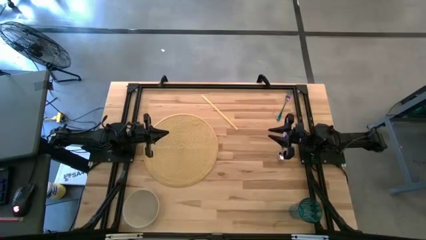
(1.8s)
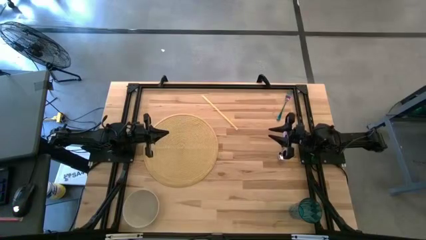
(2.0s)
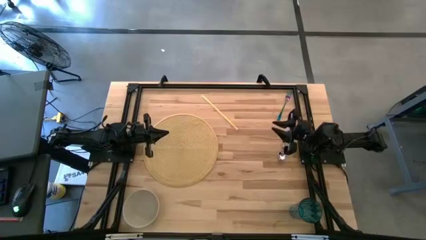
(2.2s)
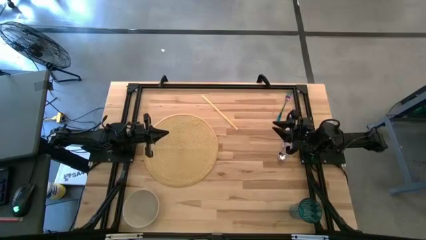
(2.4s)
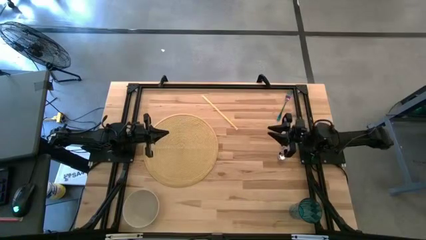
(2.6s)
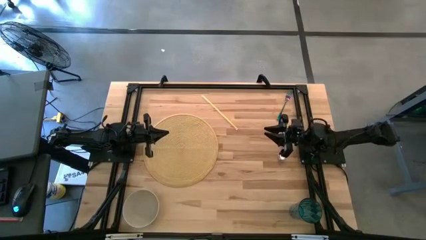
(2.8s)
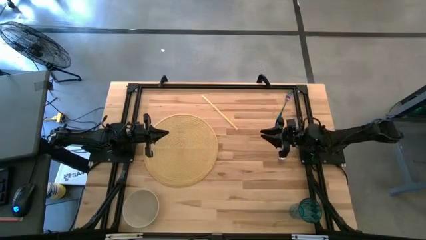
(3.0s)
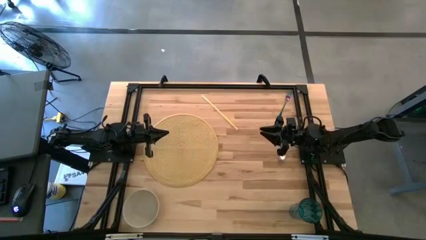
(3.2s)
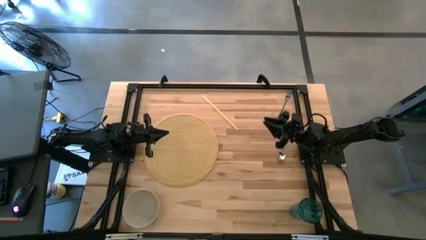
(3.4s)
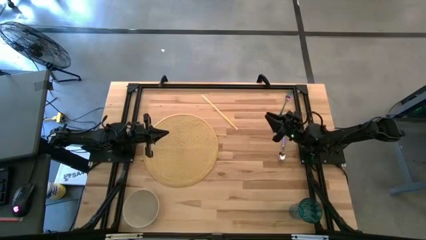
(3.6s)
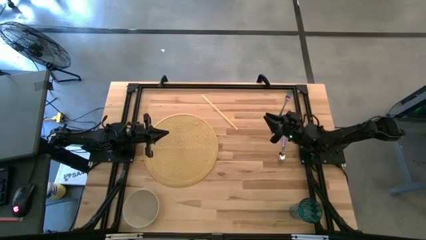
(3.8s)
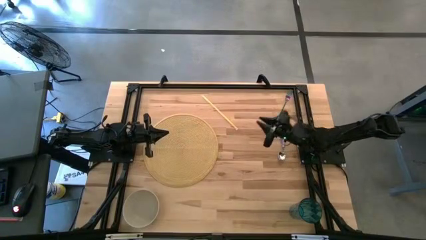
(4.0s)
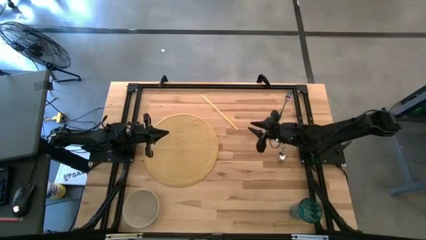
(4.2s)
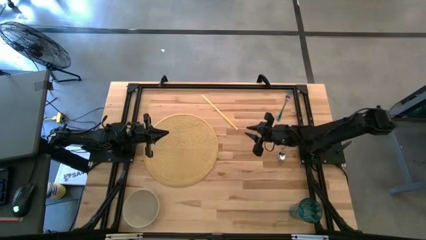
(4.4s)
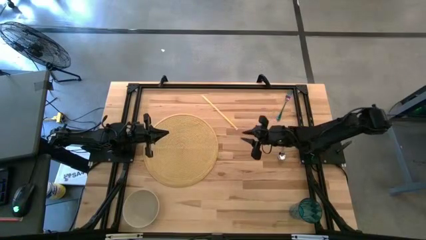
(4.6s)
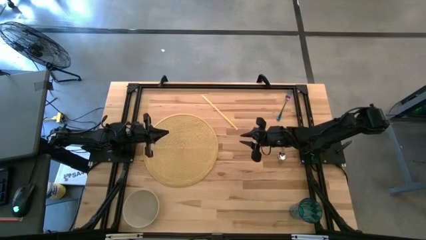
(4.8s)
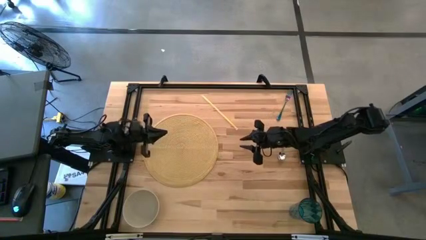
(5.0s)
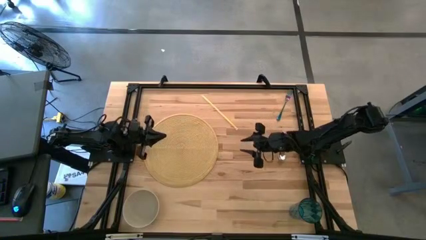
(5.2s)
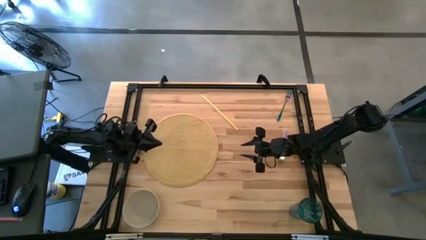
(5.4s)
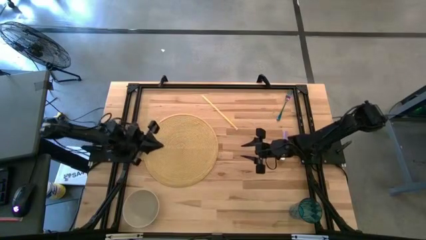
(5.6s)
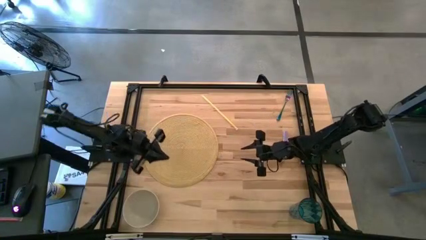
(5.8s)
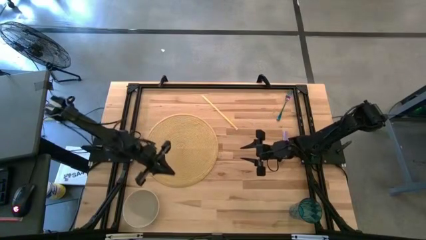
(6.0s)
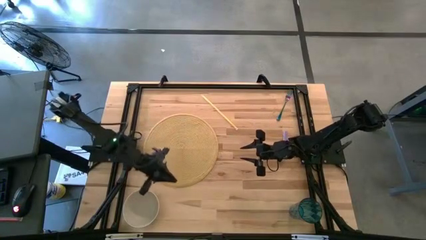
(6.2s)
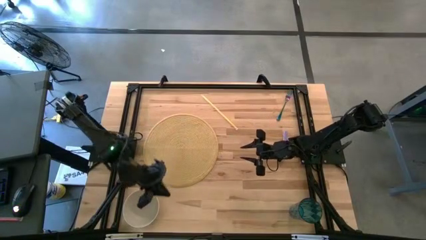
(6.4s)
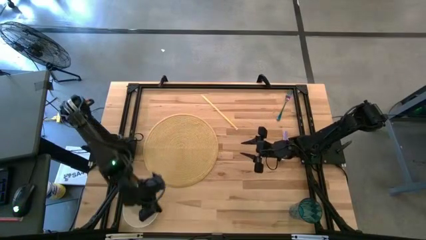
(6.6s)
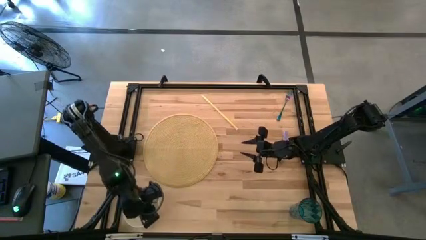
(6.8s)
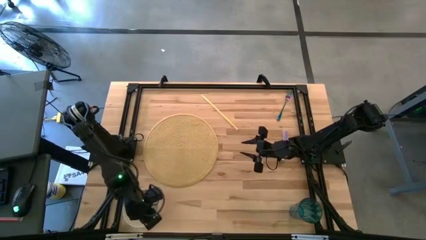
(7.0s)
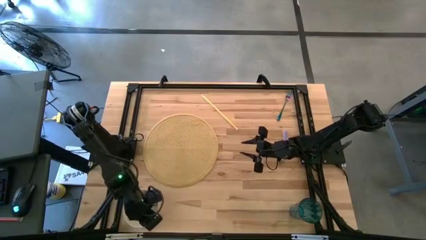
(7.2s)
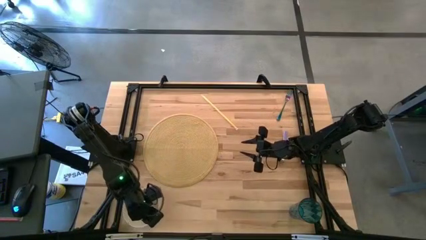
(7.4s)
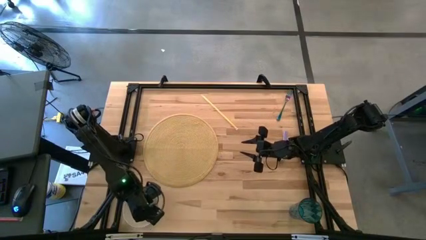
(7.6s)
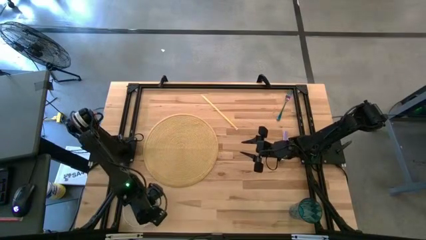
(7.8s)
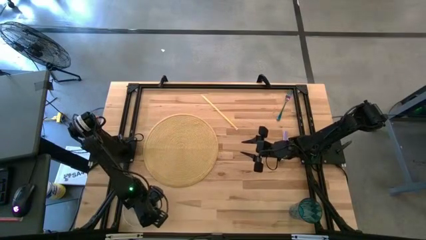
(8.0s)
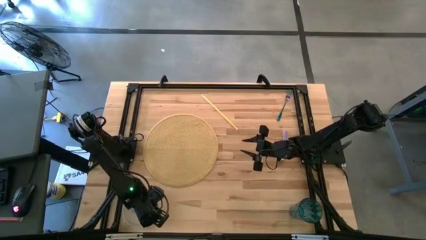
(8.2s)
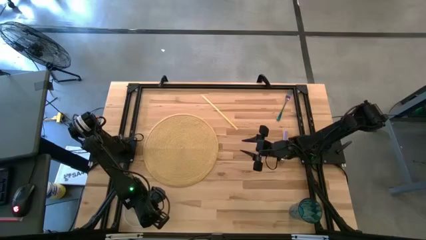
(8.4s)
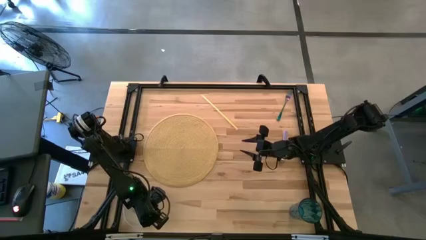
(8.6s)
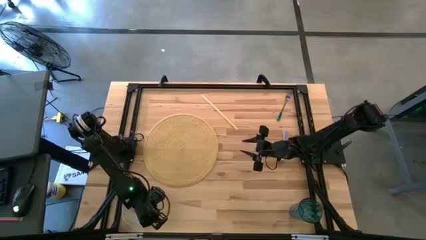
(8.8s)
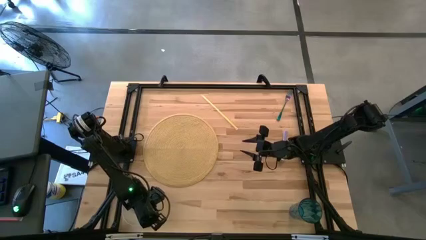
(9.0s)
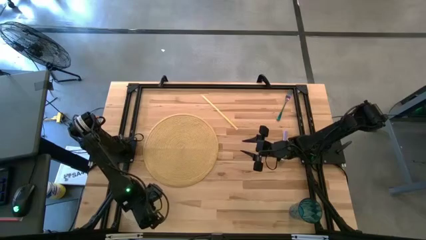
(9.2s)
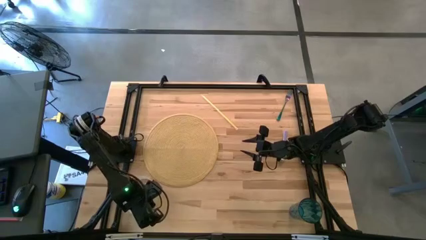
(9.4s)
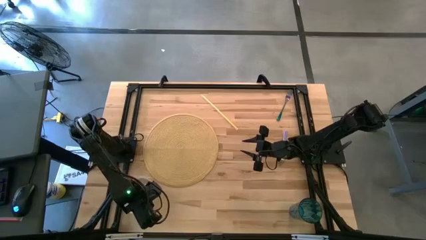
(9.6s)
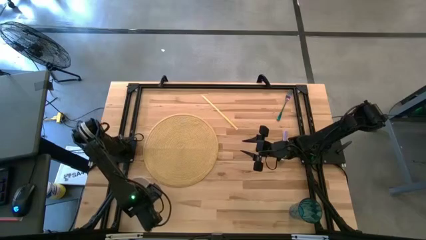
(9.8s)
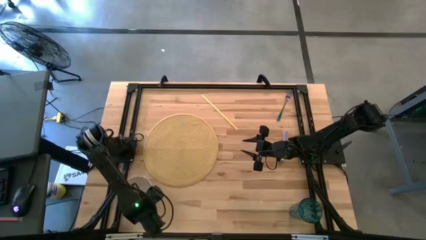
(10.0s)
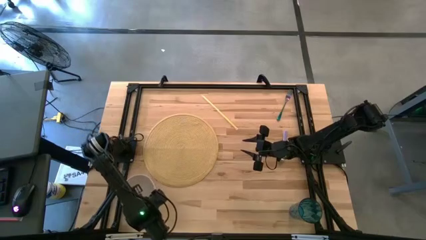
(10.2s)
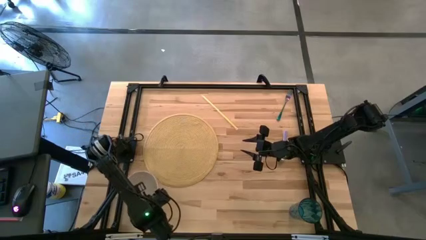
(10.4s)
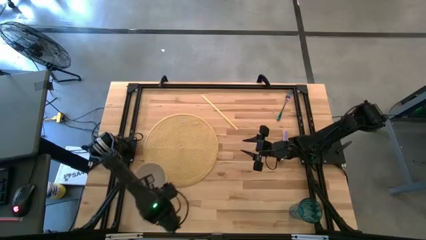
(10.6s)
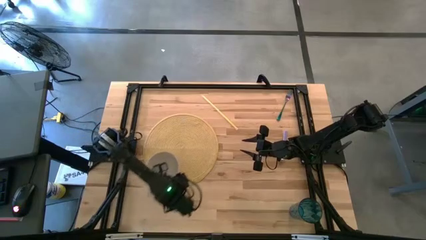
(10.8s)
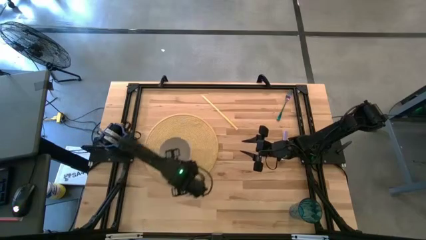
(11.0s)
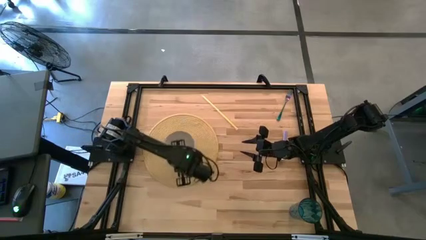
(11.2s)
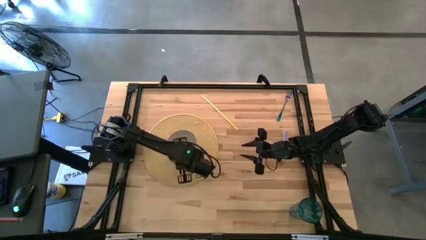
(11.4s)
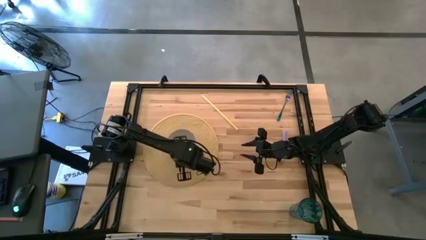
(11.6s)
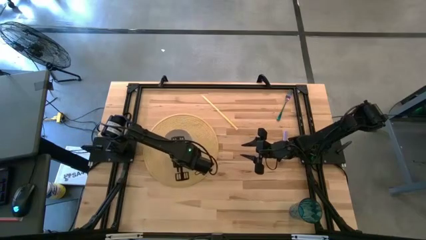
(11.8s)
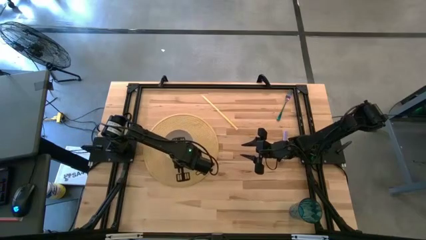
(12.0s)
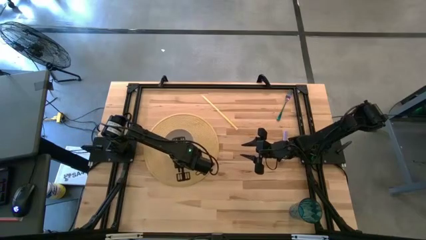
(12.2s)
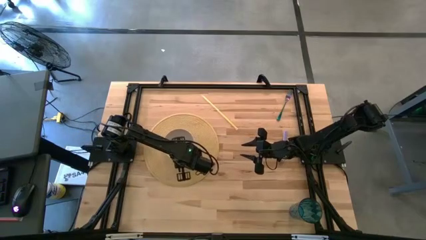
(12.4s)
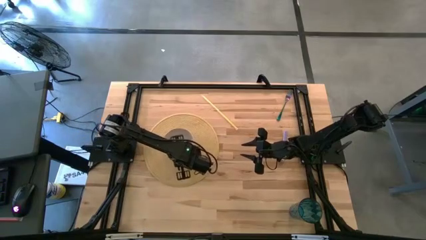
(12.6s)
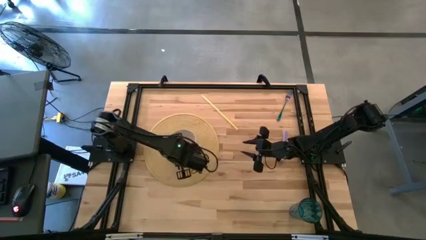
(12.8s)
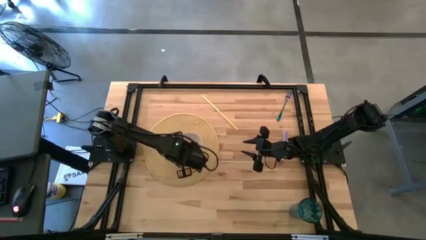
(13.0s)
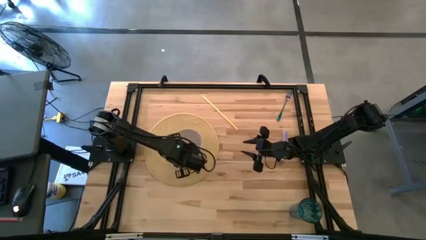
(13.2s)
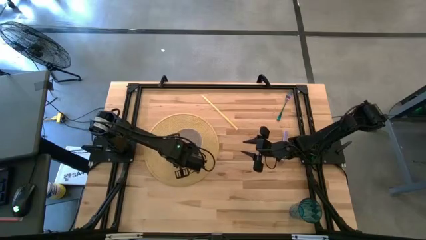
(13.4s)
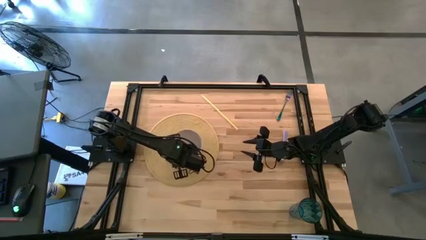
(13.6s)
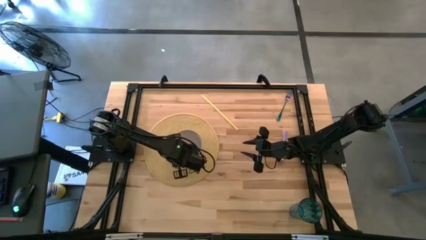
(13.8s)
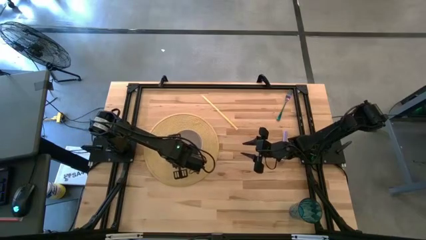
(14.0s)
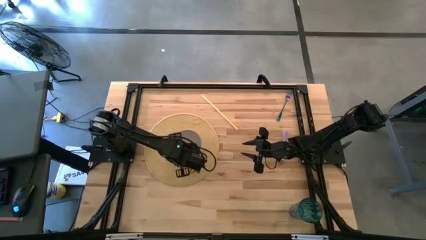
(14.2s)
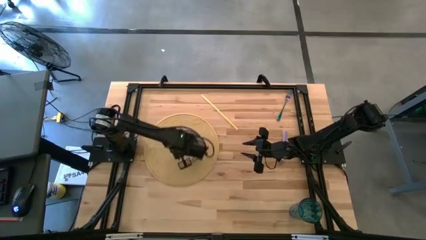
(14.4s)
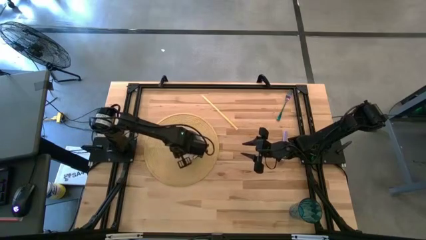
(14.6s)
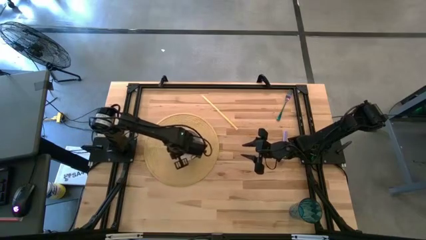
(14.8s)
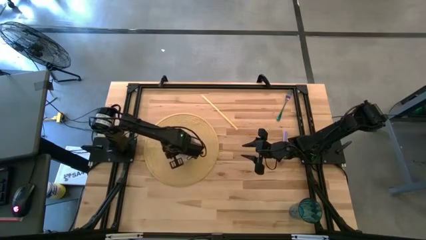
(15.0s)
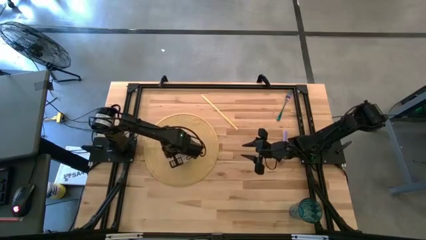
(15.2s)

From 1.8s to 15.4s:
Task: Pick & Place Utensil
Put the white bowl on the middle of the yellow mat
